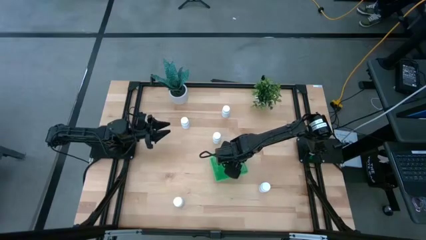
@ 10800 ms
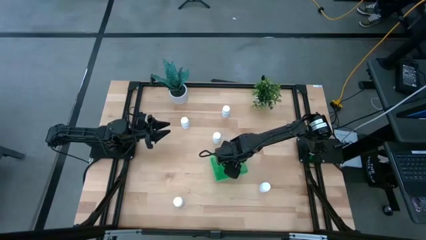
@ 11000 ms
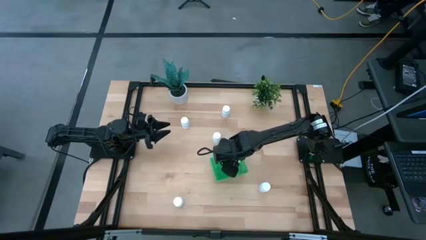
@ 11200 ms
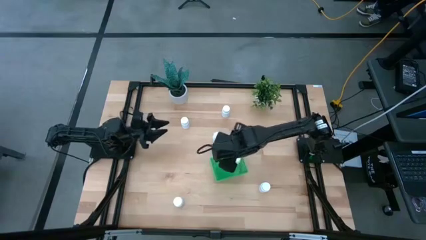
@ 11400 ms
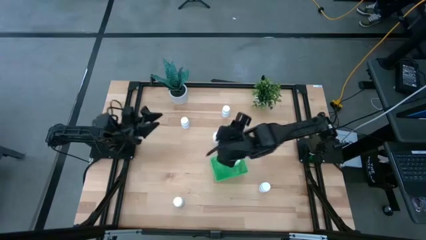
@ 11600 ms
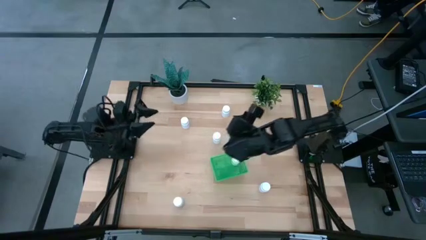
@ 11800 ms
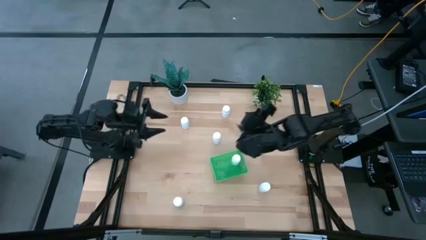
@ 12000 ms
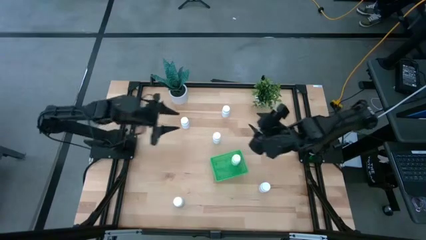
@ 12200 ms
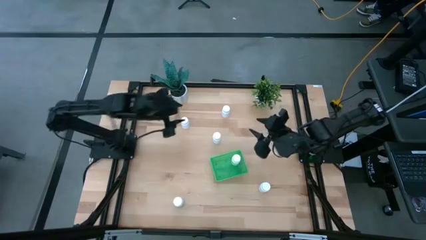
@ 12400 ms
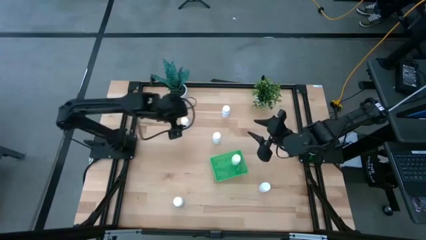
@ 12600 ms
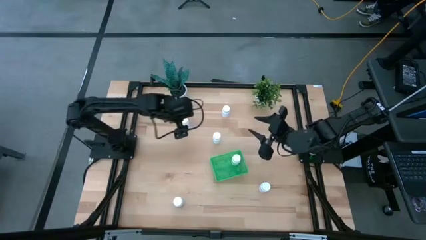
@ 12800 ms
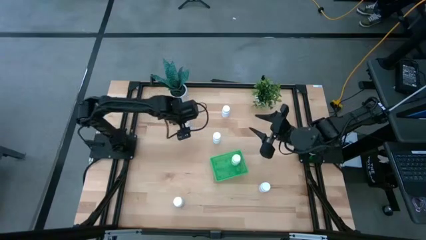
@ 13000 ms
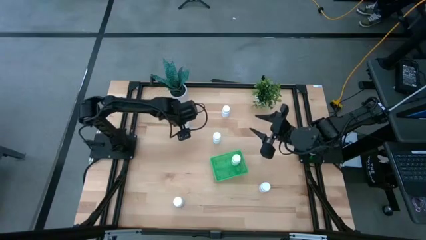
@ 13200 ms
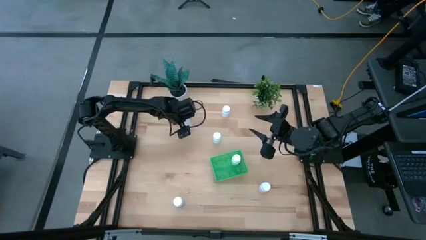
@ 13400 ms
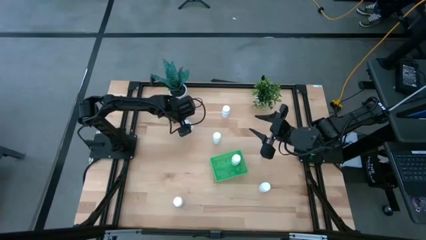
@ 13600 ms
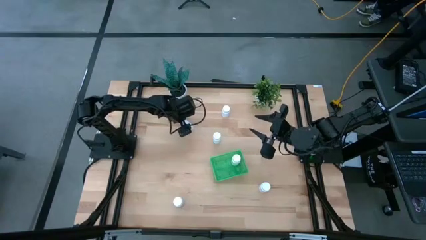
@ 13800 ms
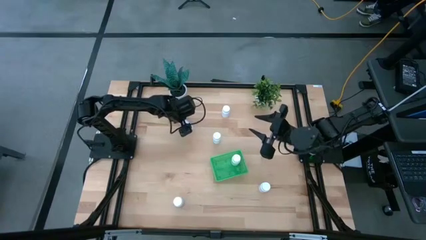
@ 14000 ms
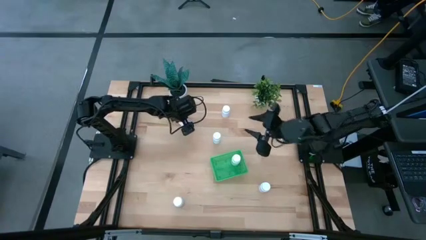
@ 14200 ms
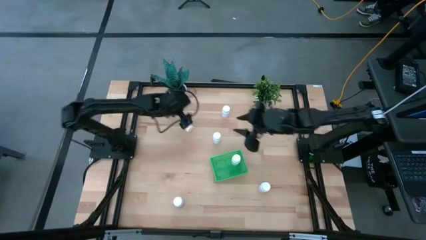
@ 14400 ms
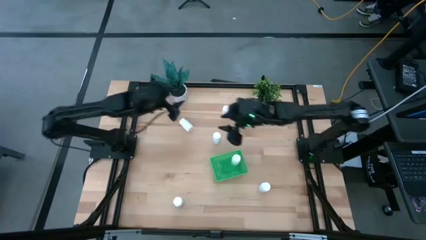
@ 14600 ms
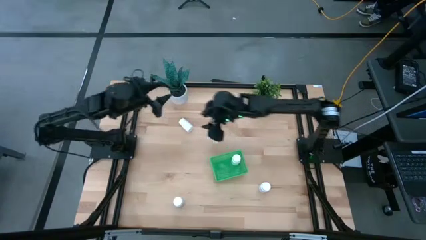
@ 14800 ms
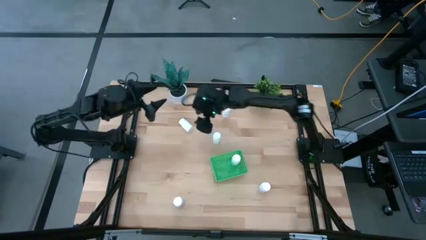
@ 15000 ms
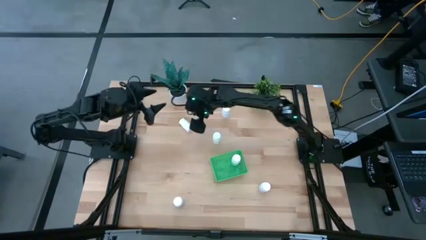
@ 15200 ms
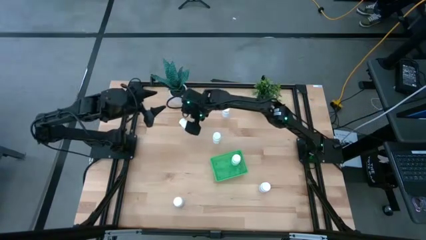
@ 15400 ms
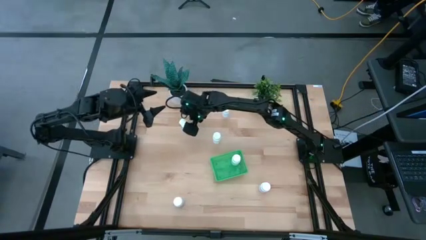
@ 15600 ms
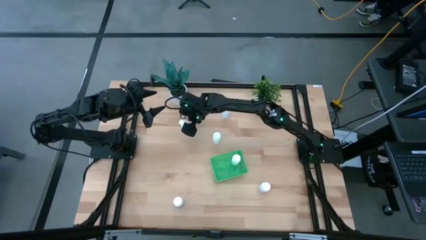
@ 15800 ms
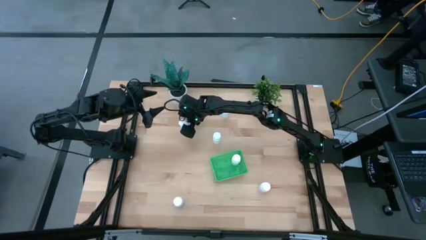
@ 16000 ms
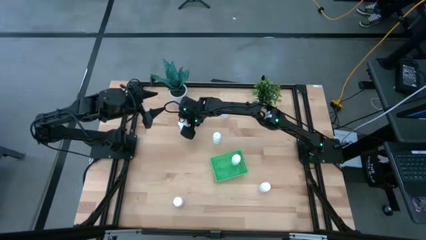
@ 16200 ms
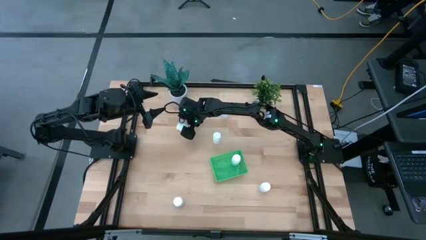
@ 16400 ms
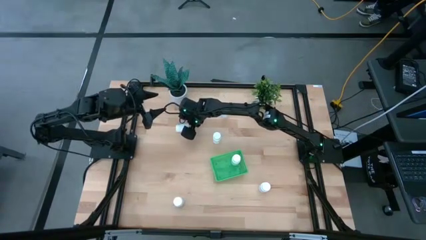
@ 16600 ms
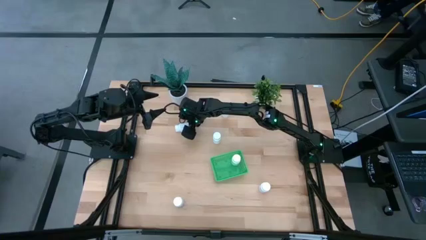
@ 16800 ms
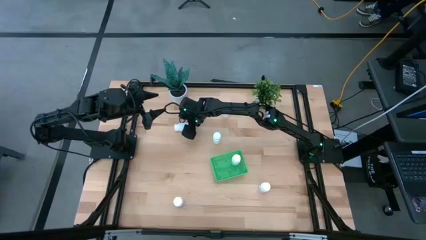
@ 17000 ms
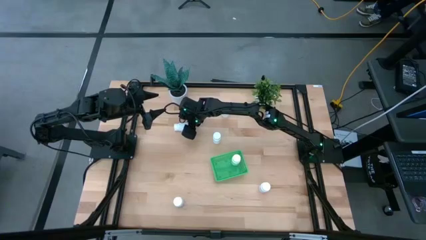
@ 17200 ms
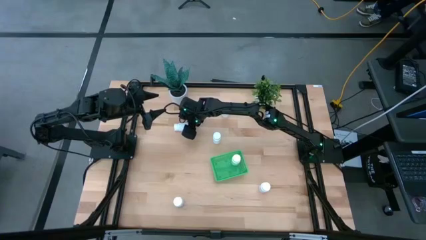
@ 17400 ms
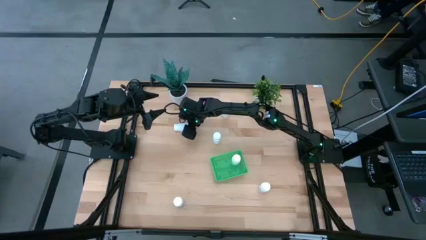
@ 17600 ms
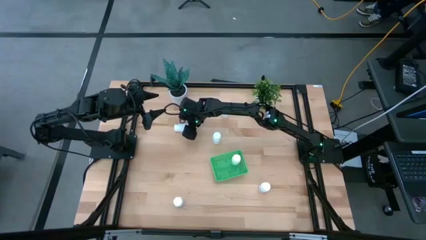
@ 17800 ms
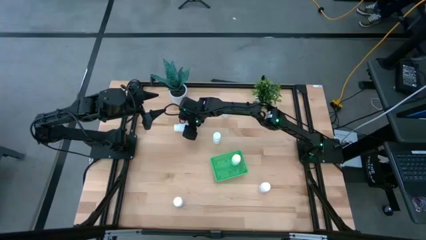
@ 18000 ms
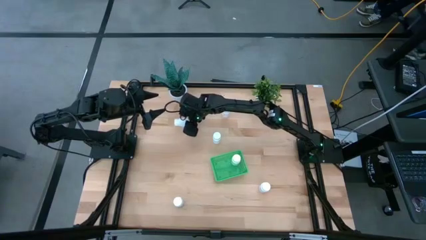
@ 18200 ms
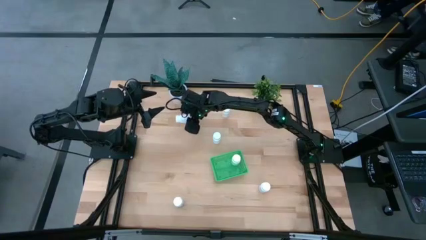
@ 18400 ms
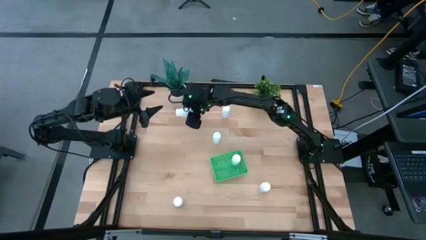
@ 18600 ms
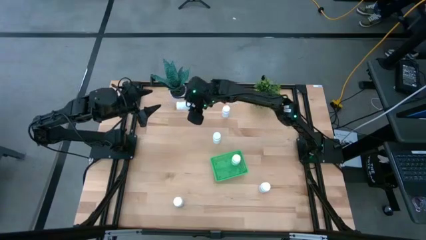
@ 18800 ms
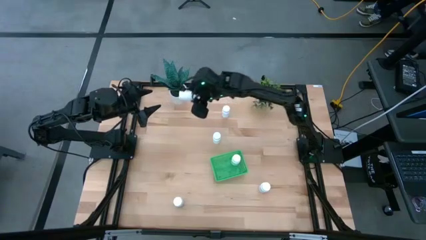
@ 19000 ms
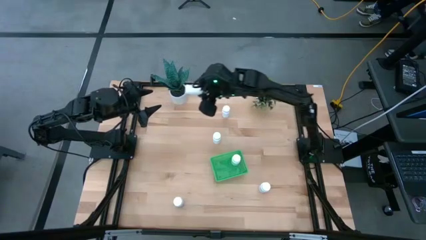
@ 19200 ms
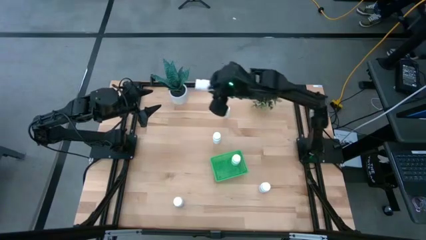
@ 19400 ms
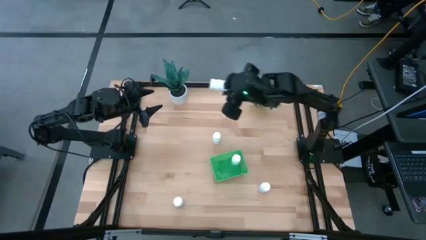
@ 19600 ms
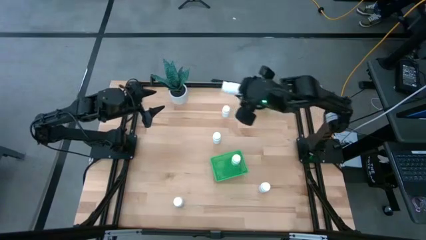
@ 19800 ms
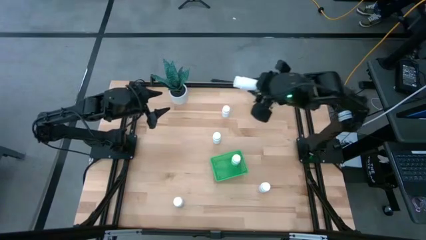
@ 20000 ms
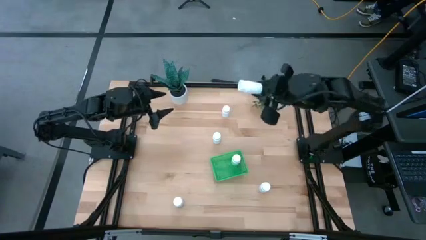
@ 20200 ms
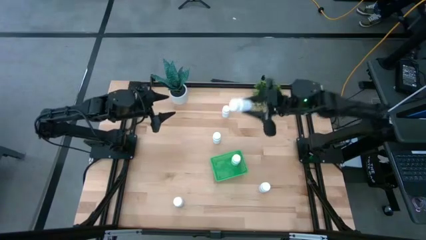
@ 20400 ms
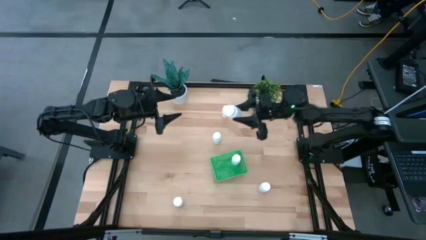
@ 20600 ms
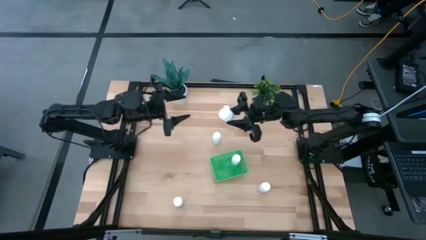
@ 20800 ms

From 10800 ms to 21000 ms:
Task: Pick and place pill bottles into a basket
Put the white medicine bottle into the green basket

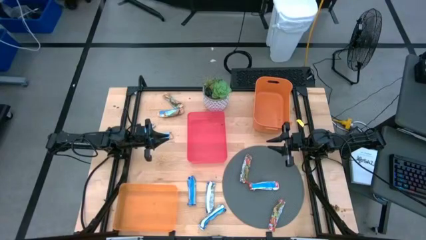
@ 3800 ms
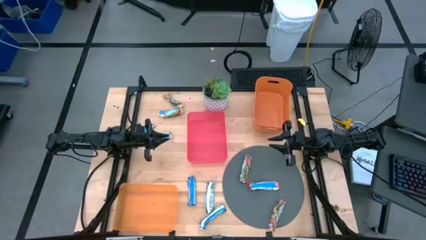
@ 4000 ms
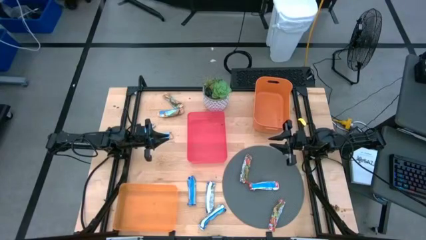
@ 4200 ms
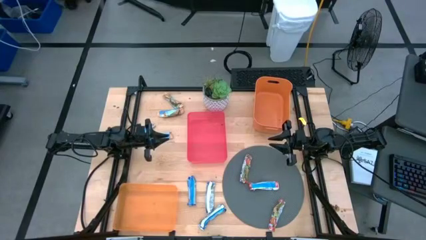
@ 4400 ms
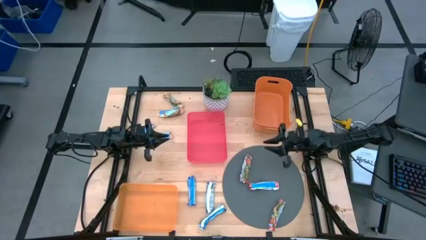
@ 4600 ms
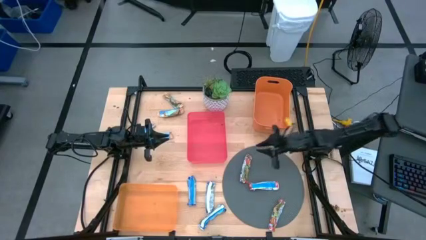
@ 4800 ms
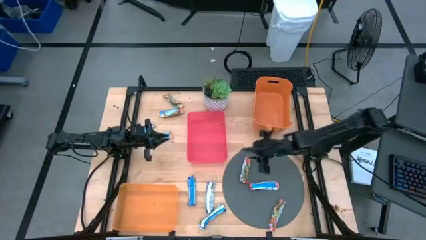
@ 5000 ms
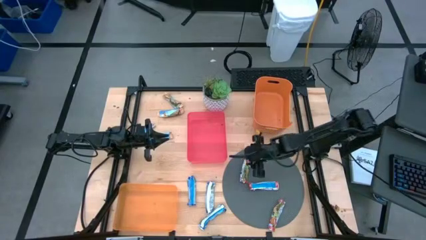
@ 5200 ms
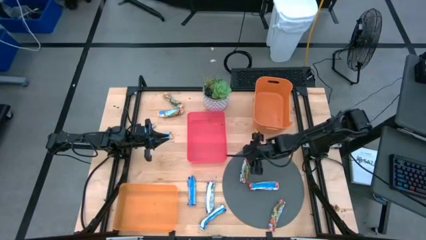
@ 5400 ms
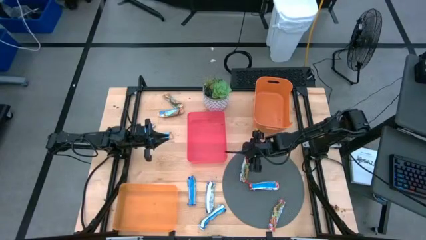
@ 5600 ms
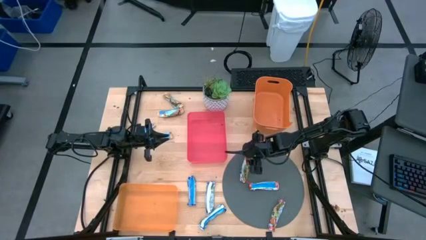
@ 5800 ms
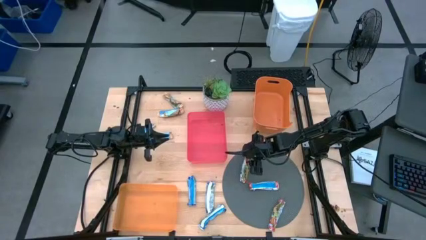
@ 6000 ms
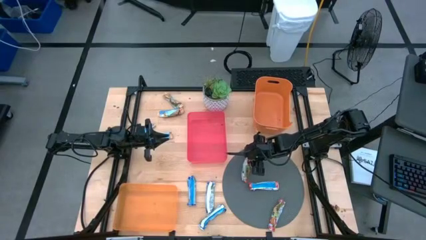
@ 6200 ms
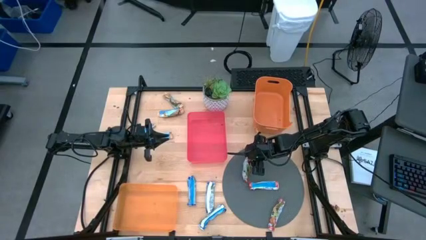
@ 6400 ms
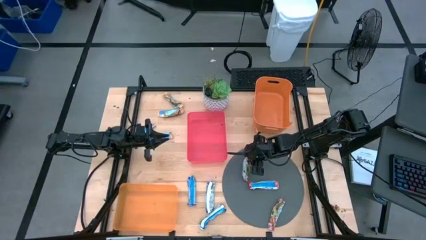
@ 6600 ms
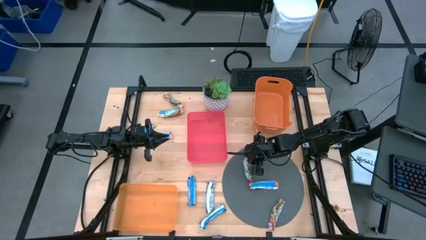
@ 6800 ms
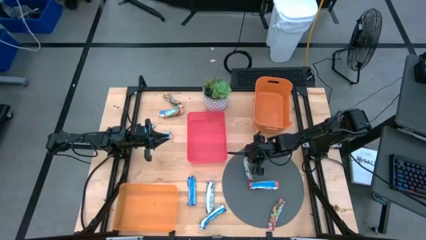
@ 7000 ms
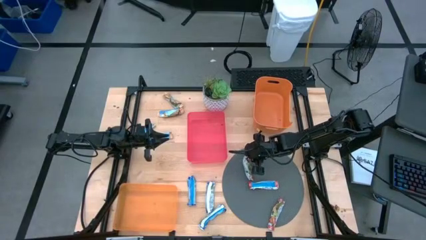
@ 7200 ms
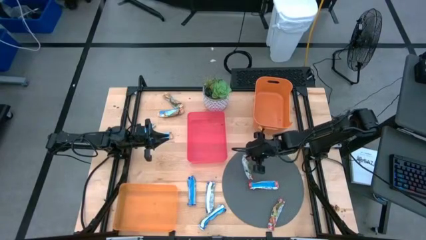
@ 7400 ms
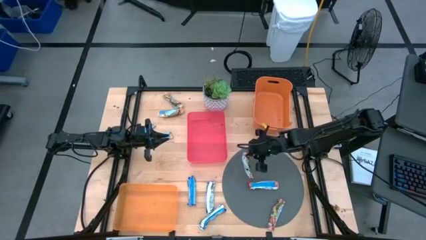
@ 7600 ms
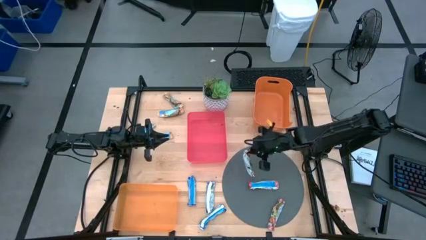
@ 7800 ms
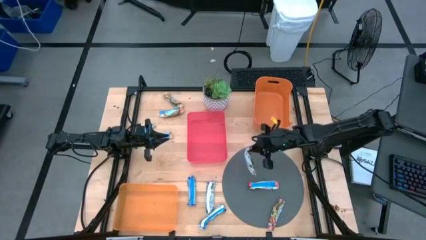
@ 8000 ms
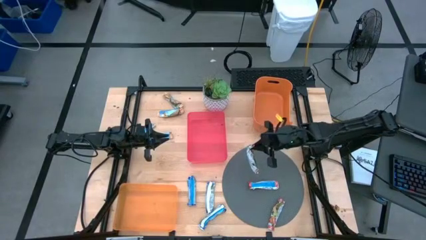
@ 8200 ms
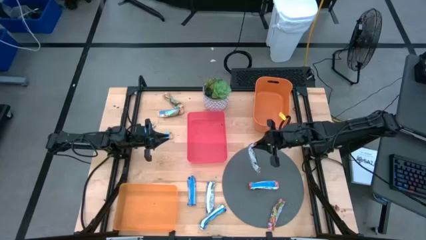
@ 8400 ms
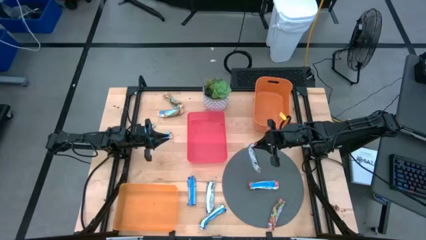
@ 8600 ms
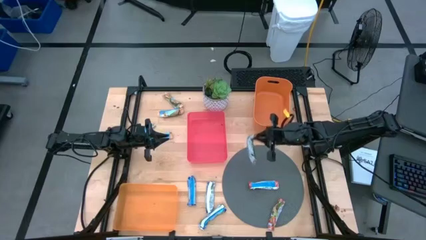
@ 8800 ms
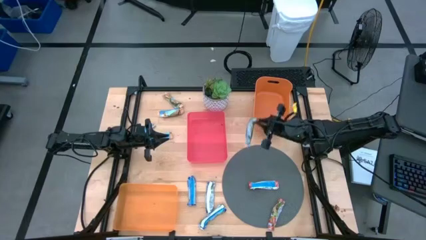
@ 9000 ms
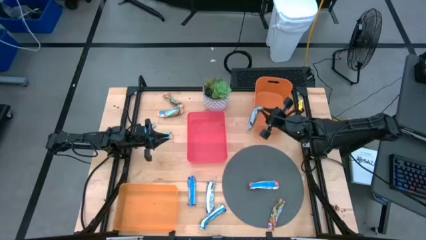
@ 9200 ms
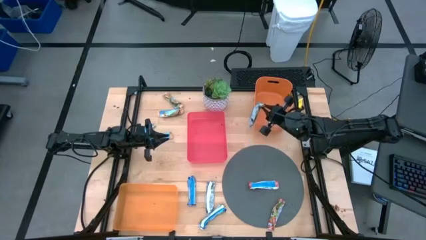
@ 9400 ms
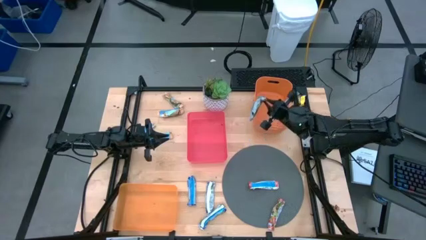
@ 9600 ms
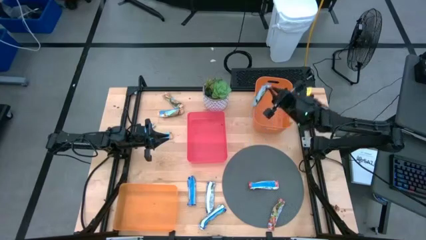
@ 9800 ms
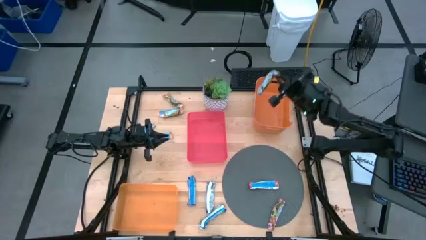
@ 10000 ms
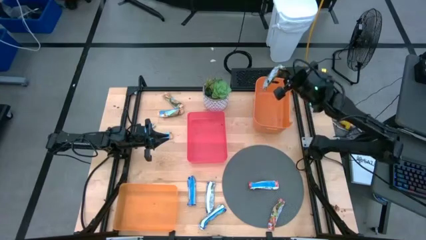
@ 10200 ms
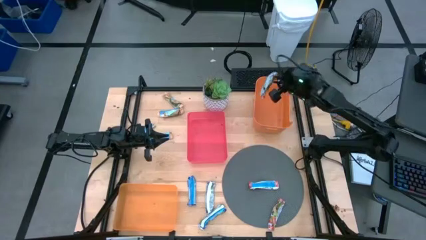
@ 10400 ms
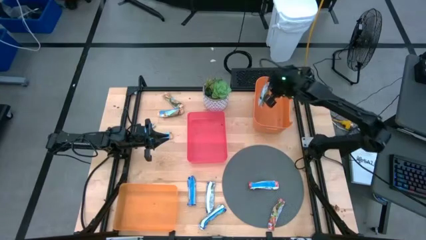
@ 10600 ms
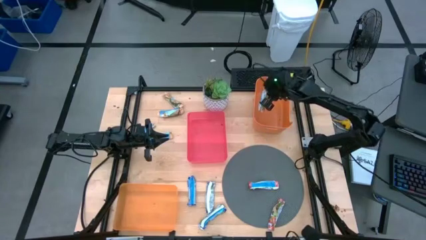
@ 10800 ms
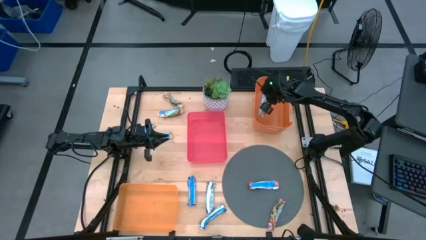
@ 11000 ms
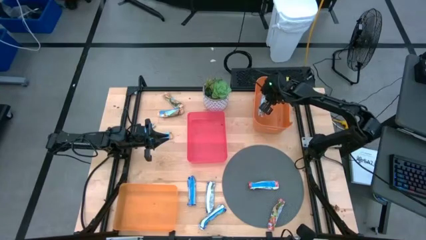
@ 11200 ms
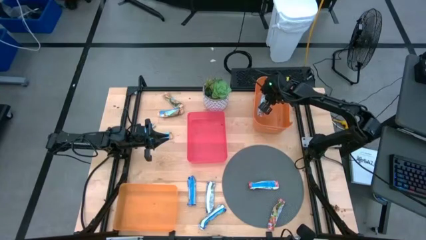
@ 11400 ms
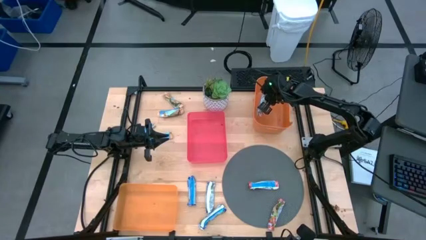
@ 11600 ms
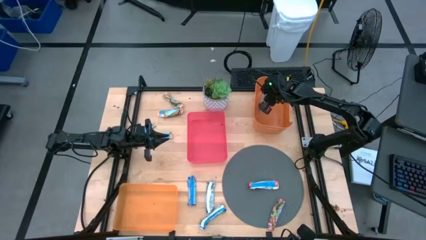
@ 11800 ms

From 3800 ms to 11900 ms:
Task: Pick and place Granola Bars by type
Put the green/red granola bar into the top right orange bin
